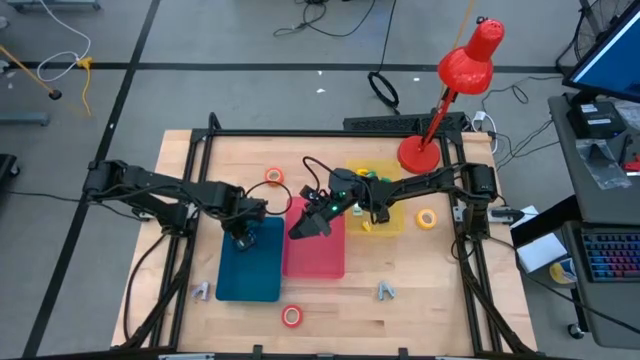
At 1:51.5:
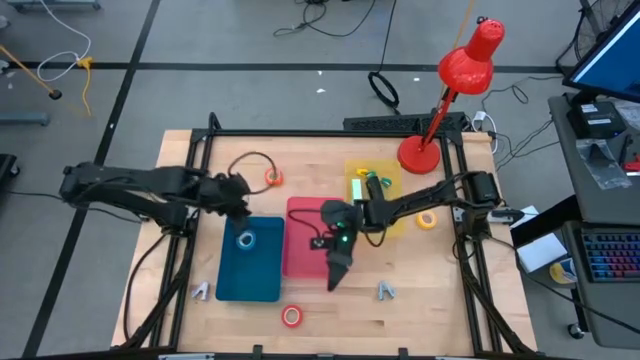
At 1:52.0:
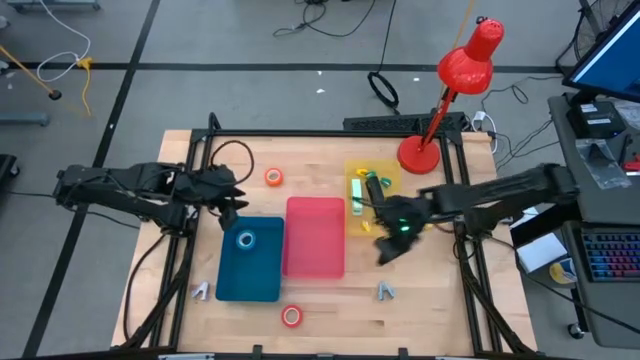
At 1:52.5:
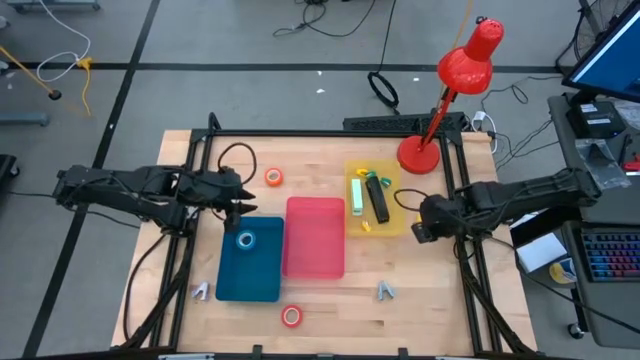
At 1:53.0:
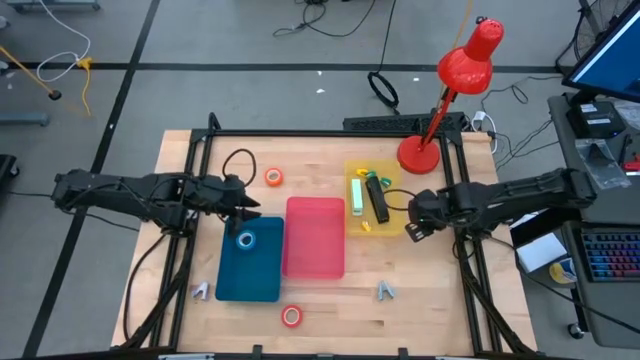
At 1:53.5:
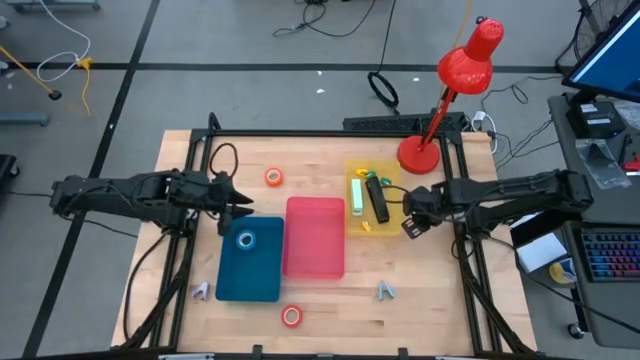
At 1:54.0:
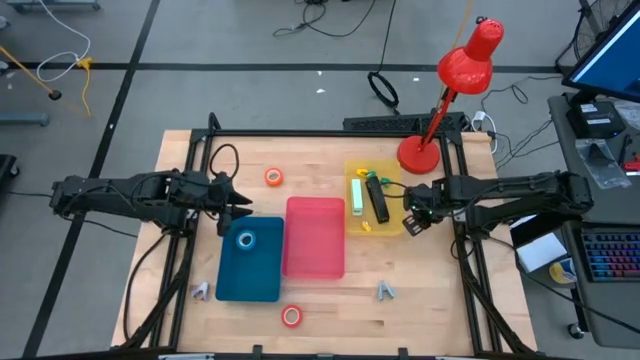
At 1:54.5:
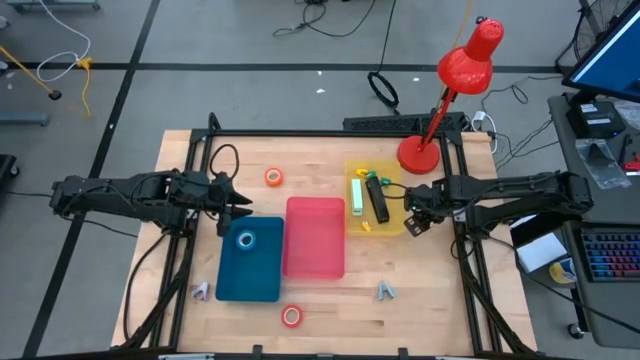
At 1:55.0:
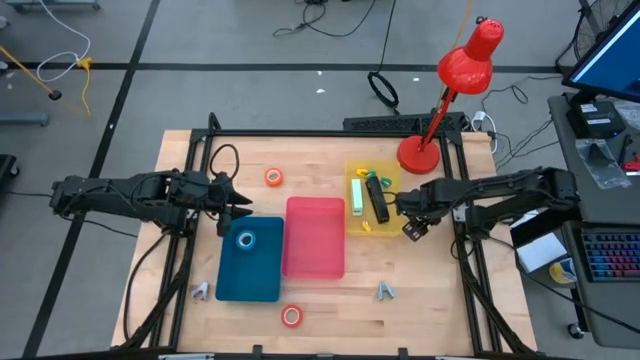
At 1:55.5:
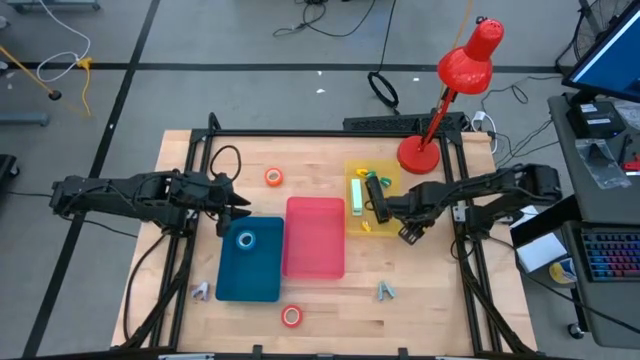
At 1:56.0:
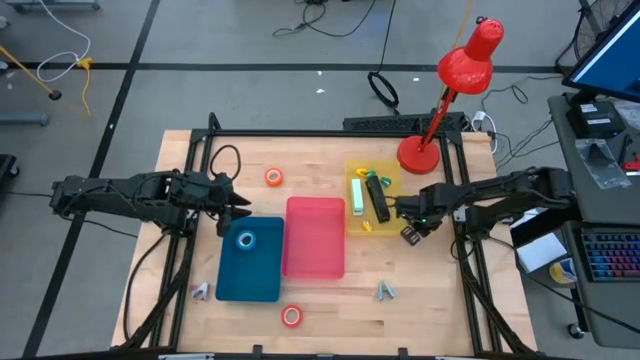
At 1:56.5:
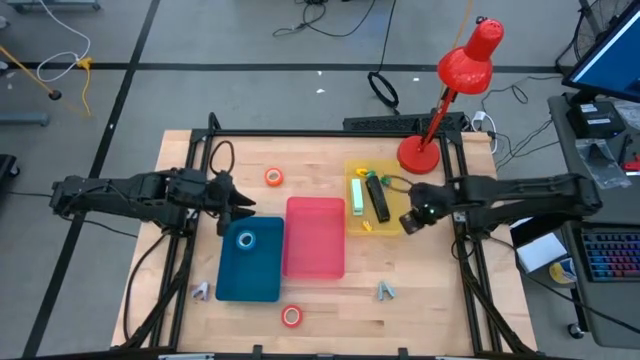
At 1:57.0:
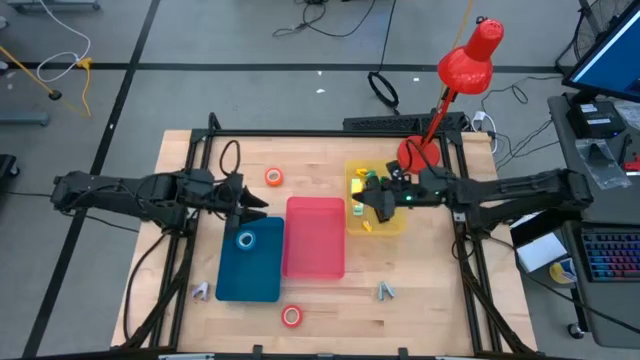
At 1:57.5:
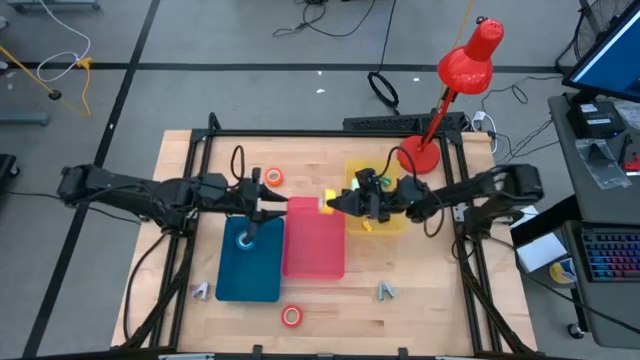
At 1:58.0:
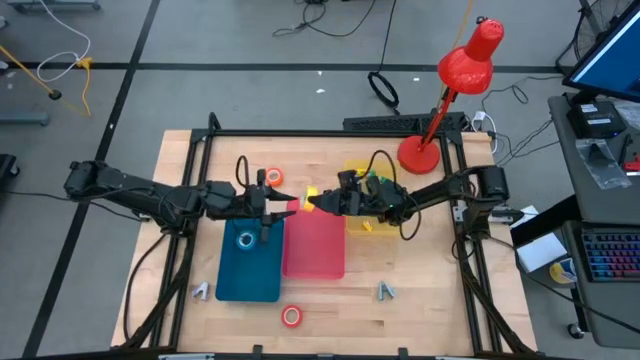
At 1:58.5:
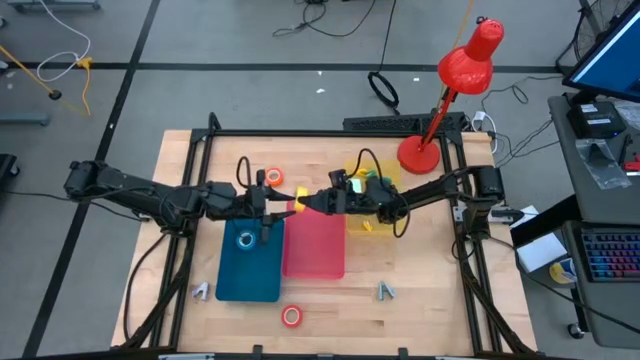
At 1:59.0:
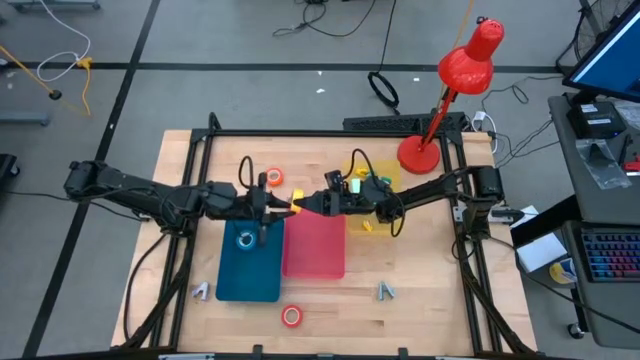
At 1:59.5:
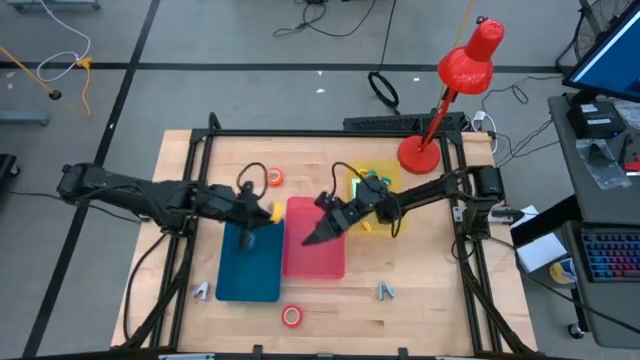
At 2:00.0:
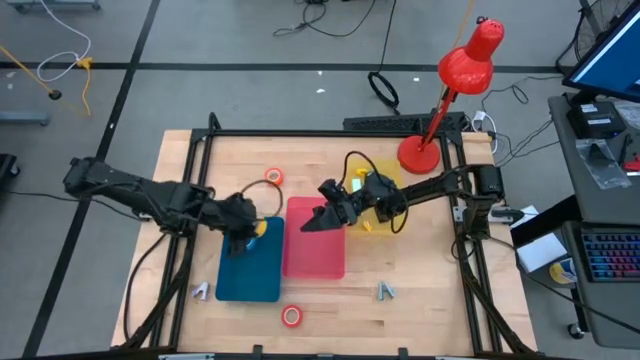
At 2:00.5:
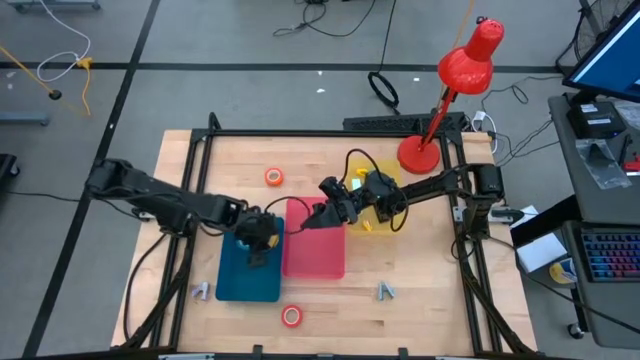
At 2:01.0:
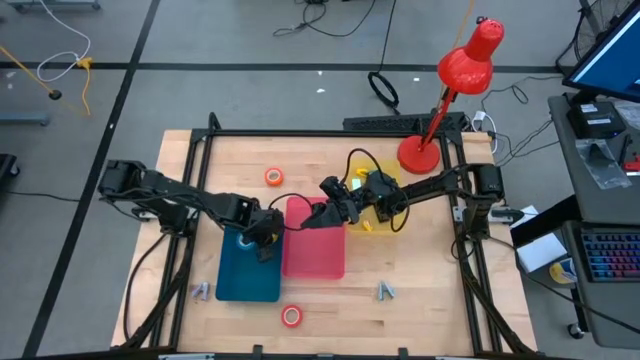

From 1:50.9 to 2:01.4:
Task: Pick and place Stapler, Stapler remover, tape
Put the yellow tape into the blue bin

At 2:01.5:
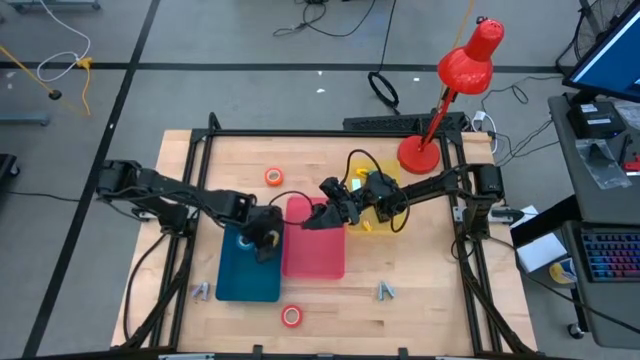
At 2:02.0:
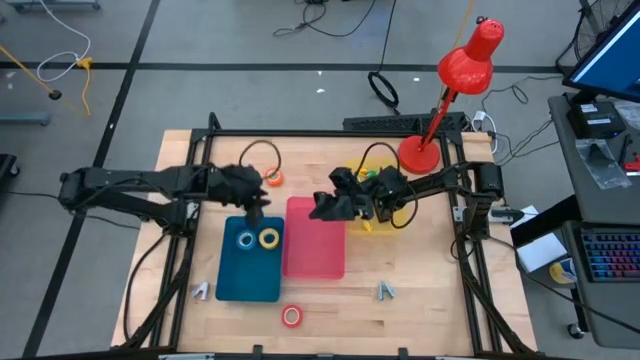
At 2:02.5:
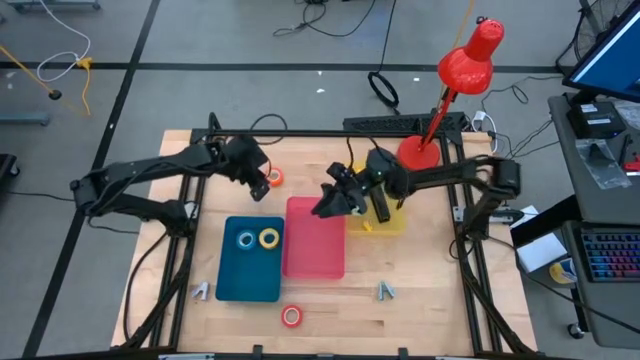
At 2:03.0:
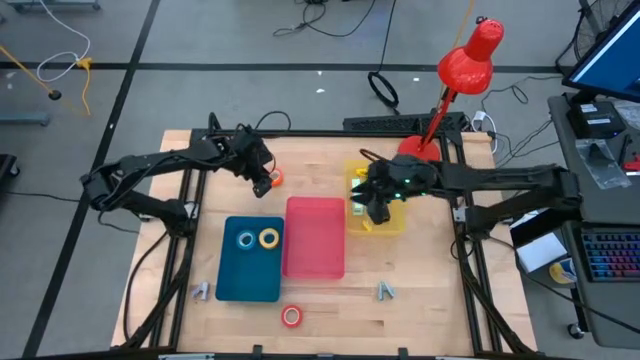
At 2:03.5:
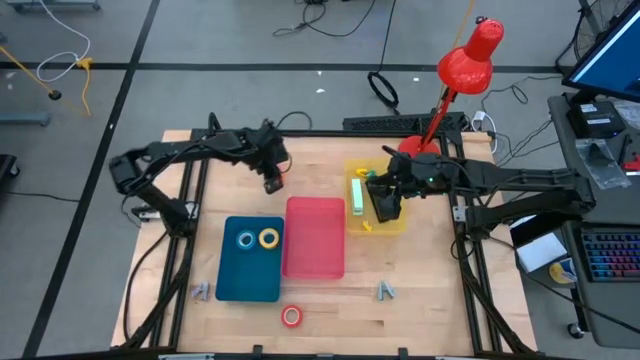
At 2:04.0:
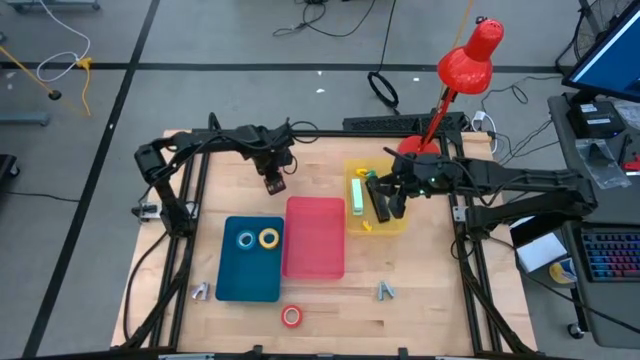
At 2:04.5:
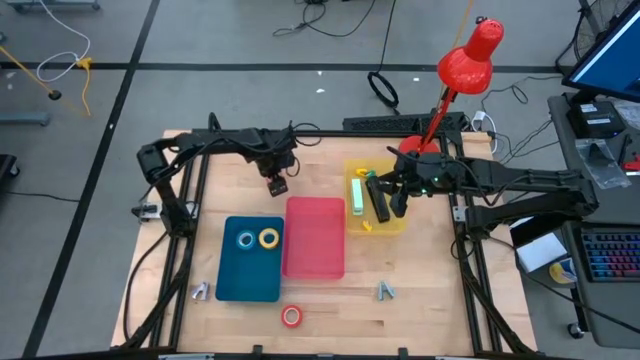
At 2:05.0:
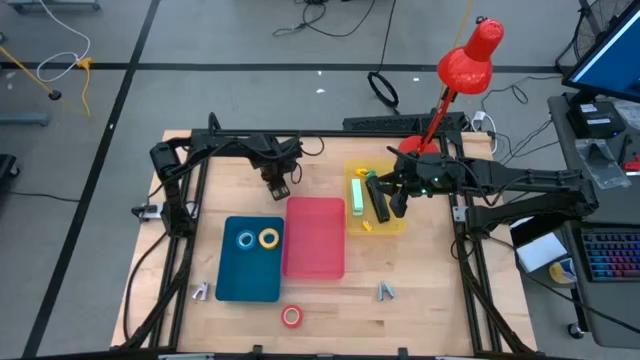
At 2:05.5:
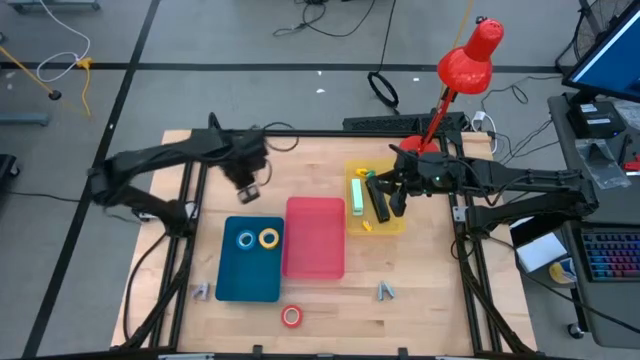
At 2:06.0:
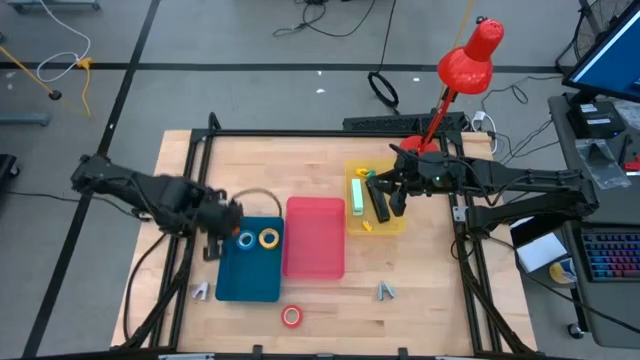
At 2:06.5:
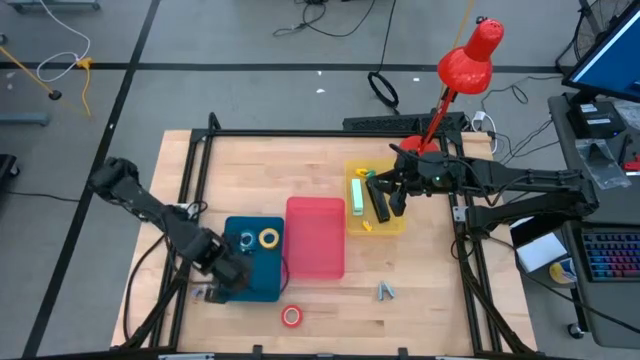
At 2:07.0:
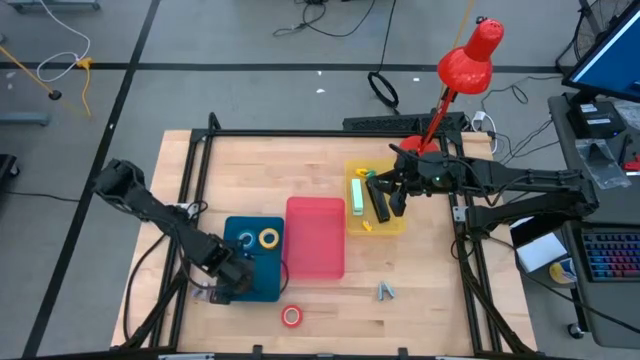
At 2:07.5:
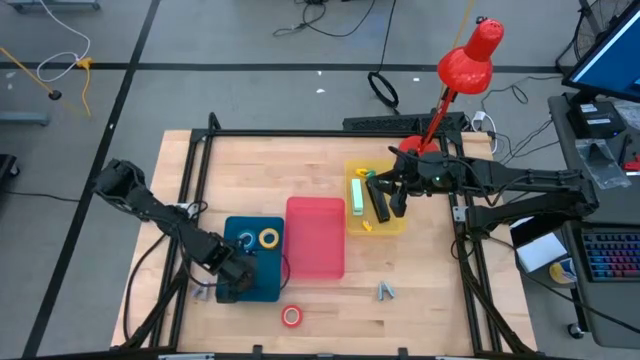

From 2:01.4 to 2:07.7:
Put the orange tape into the blue bin

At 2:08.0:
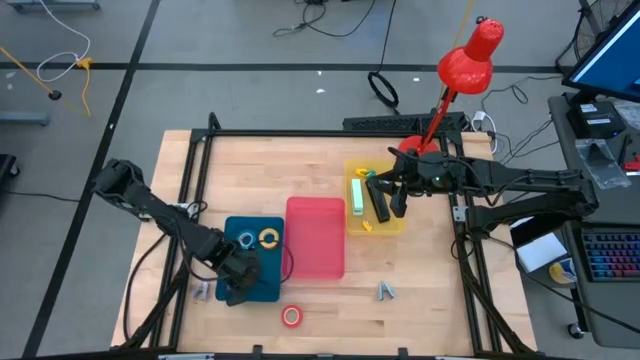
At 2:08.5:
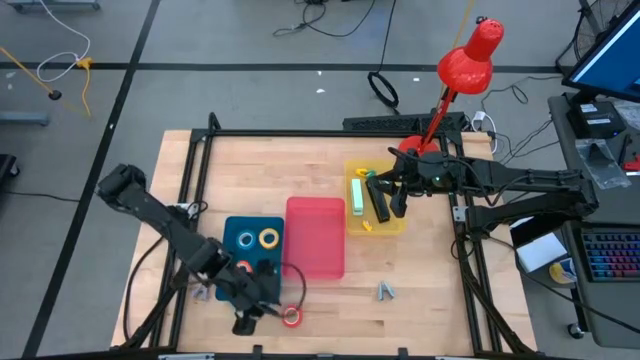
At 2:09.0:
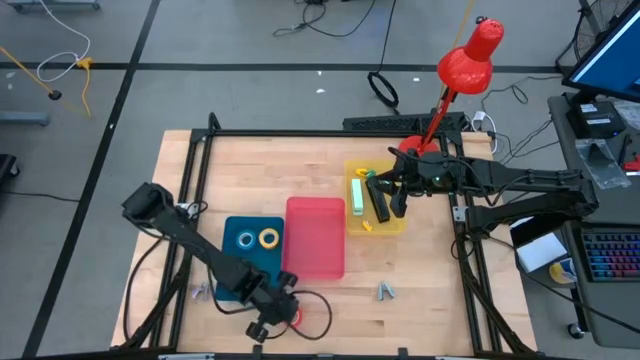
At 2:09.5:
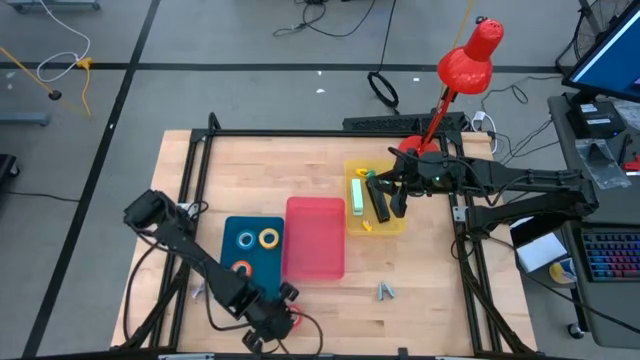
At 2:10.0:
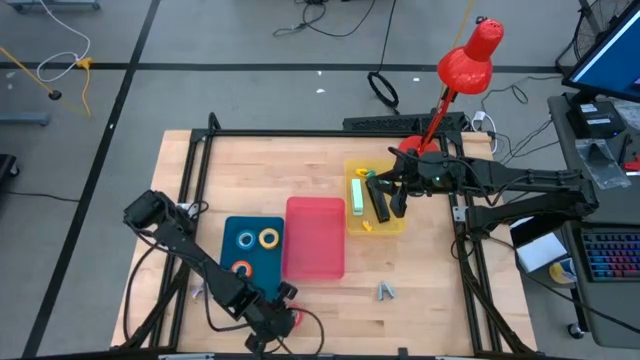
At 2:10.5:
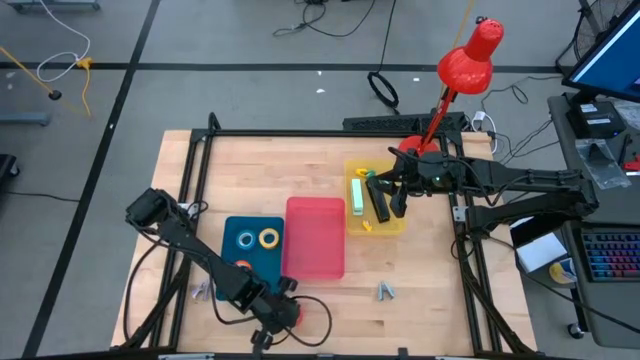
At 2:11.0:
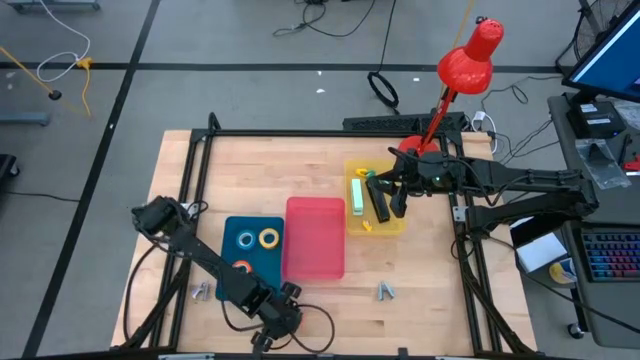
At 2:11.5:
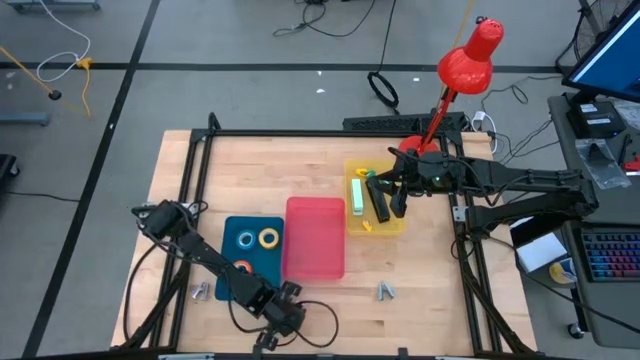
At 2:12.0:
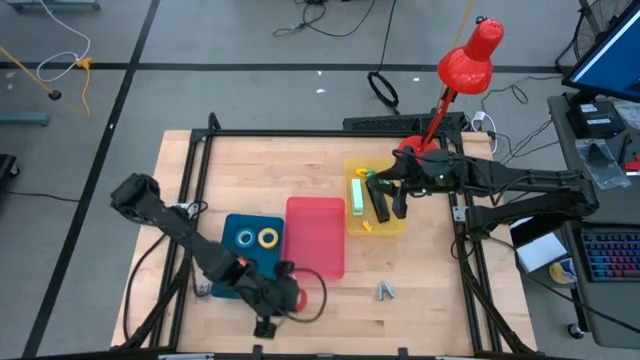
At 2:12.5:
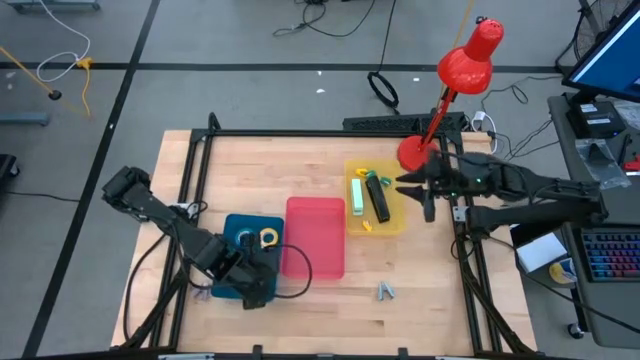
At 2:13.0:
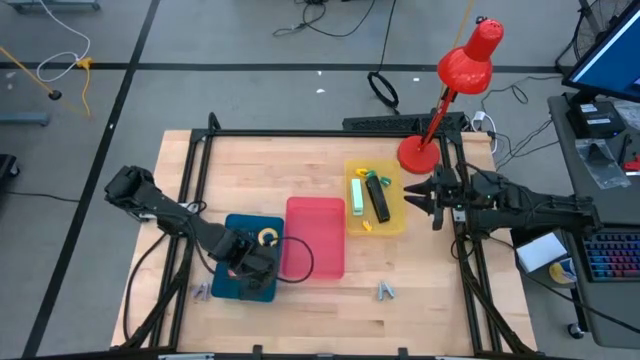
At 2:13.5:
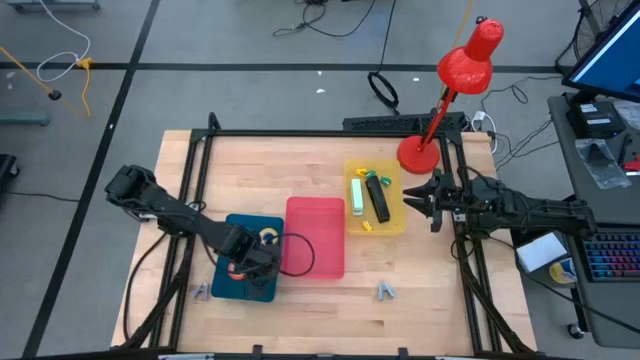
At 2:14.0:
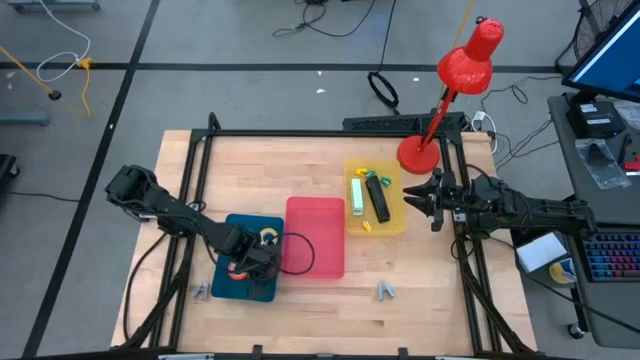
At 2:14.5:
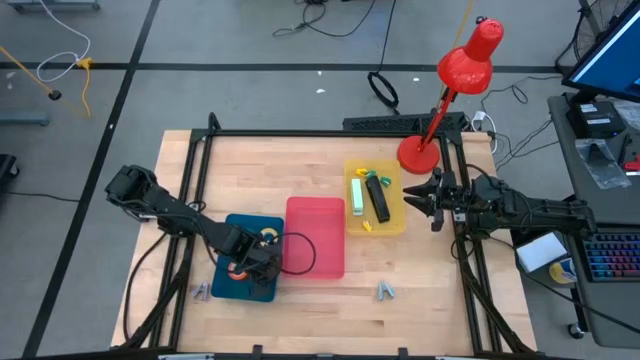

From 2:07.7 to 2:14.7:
Put the red tape into the blue bin
